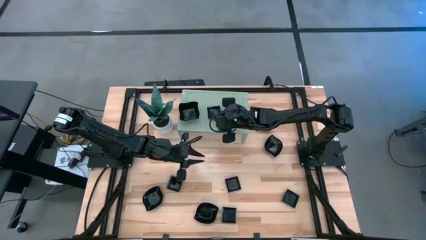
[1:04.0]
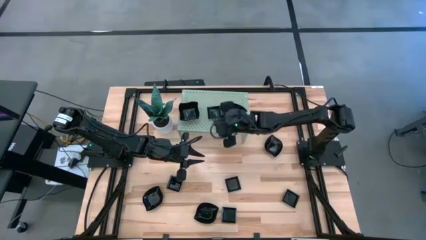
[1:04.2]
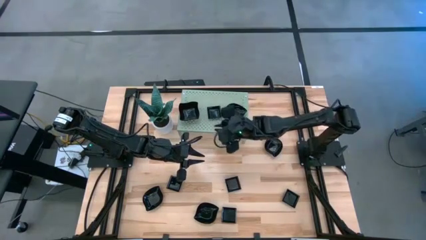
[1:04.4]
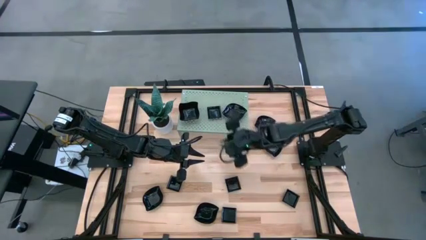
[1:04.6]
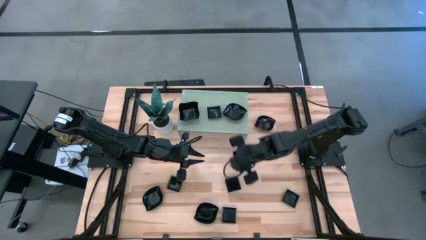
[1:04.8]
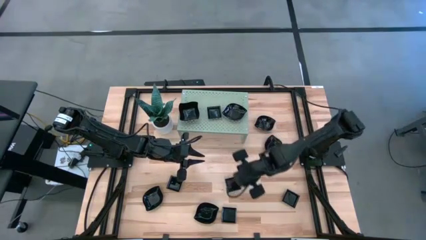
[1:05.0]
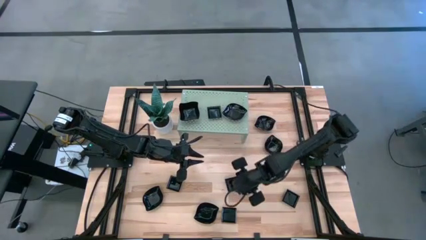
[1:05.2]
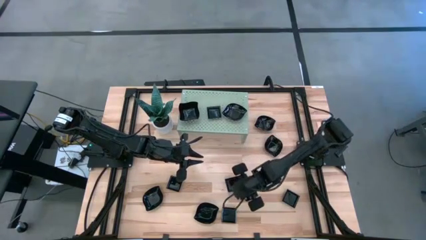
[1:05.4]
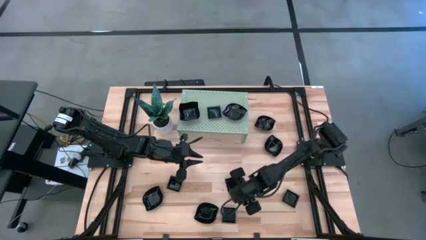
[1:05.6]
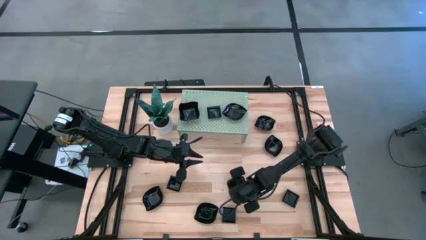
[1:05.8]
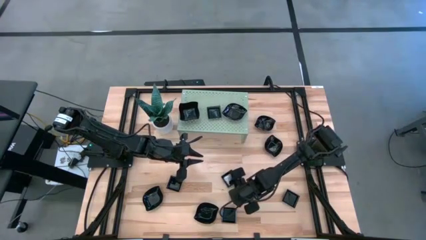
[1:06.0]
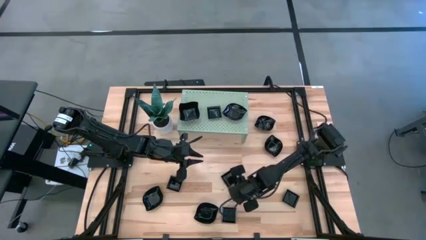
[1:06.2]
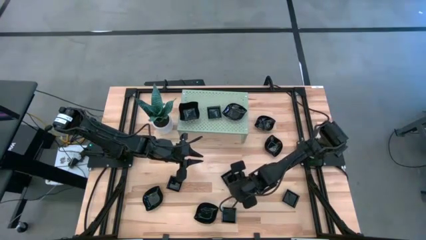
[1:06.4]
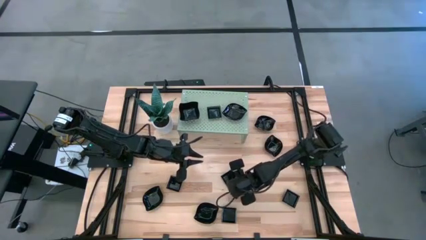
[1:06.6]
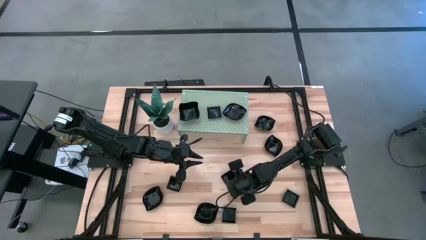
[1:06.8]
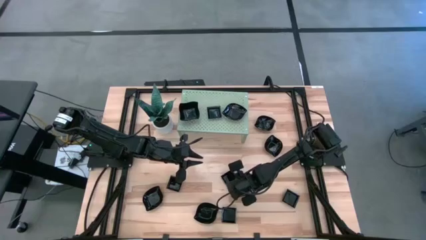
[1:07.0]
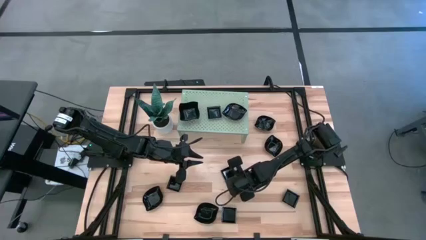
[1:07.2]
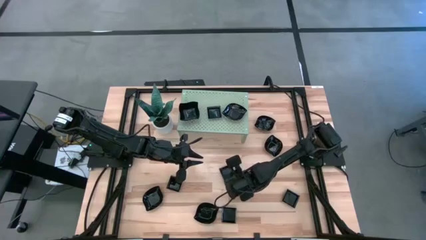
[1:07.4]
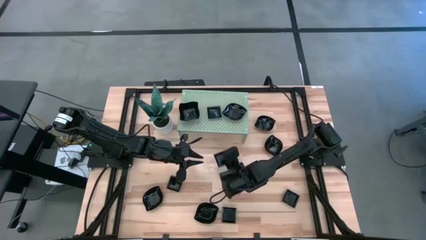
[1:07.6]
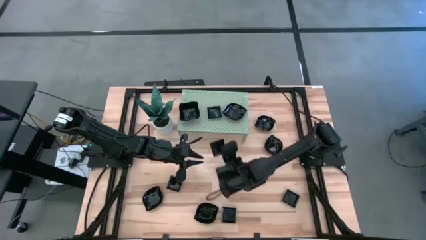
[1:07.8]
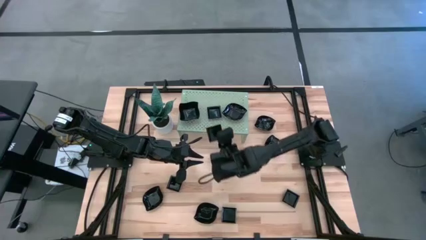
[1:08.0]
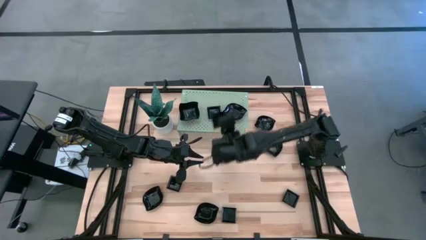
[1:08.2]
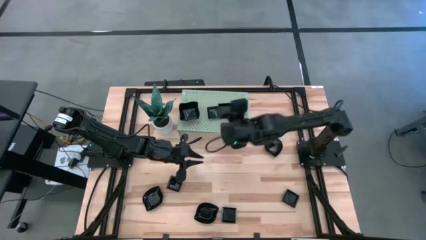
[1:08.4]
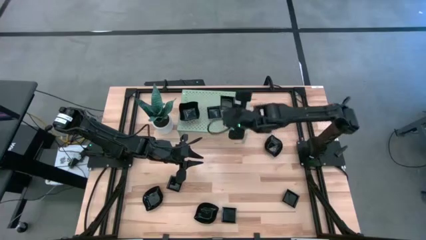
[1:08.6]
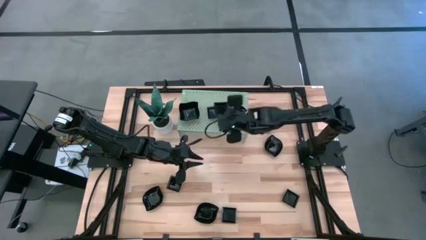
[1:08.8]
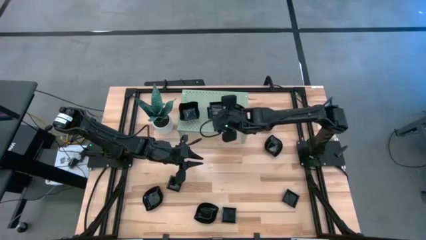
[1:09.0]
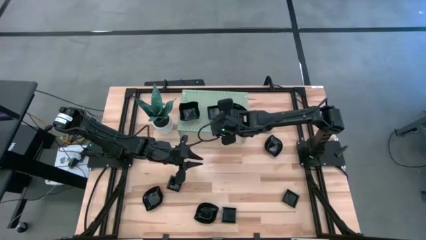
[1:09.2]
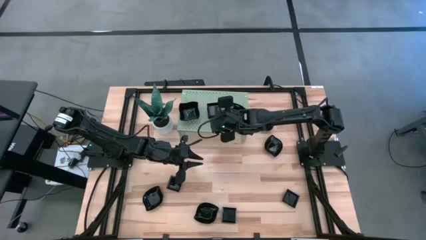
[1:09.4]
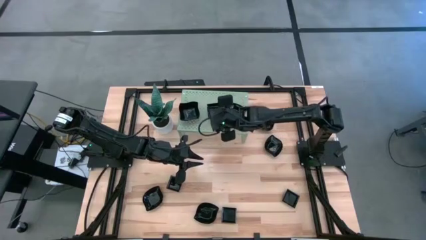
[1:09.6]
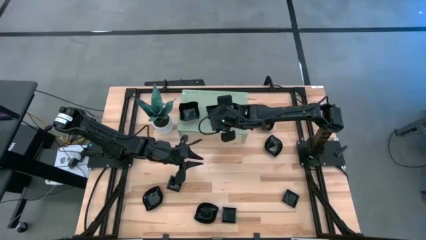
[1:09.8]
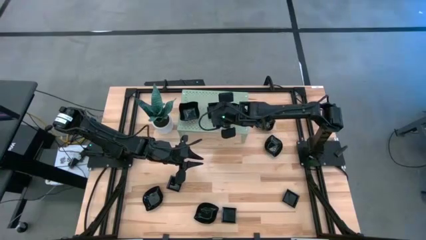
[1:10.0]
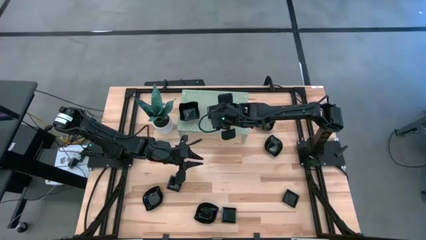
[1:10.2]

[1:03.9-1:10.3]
Task: Pick & Place Mini shaped plates
Stack the square plate on top of the other square plate on the shelf

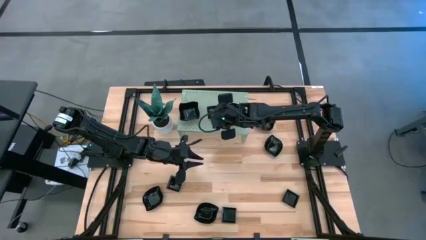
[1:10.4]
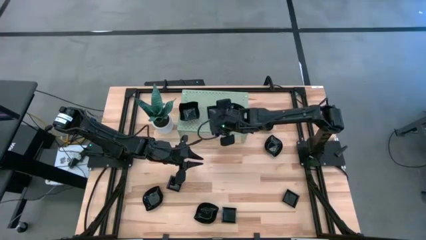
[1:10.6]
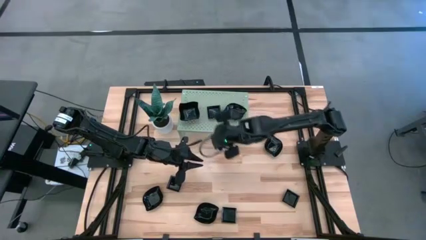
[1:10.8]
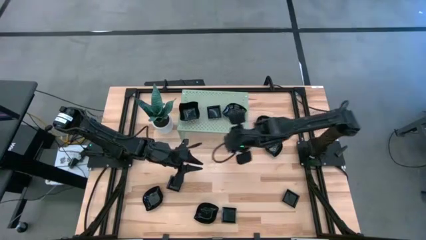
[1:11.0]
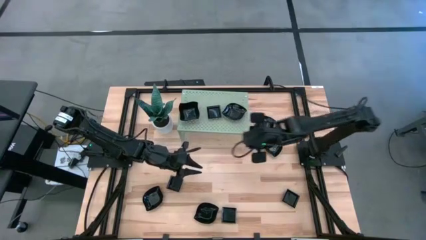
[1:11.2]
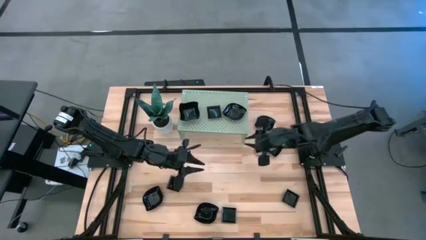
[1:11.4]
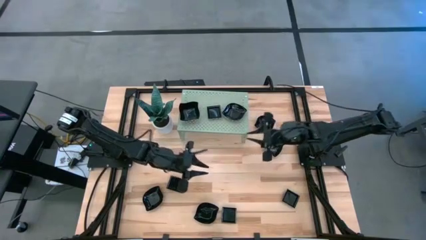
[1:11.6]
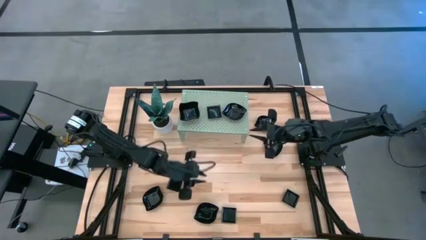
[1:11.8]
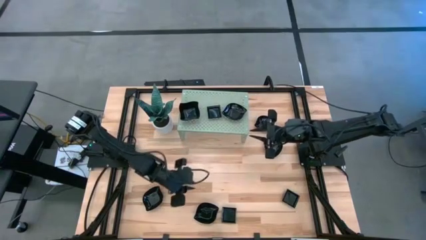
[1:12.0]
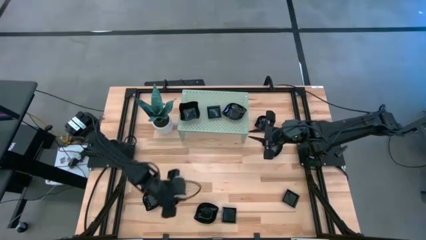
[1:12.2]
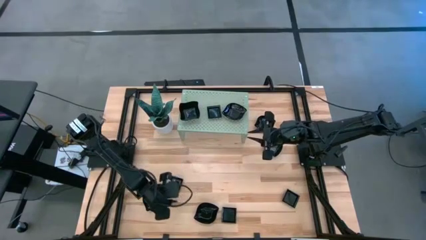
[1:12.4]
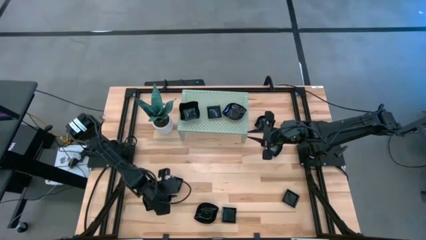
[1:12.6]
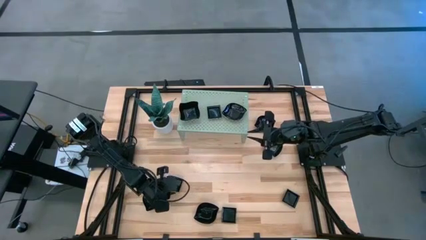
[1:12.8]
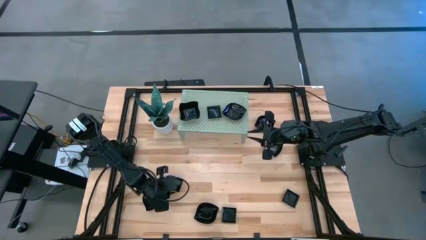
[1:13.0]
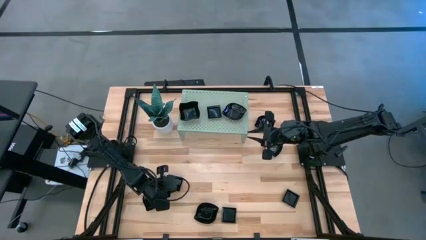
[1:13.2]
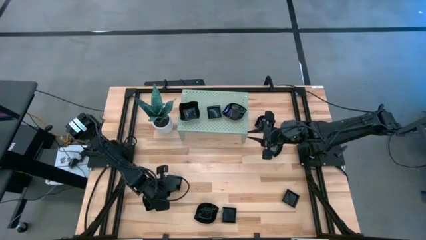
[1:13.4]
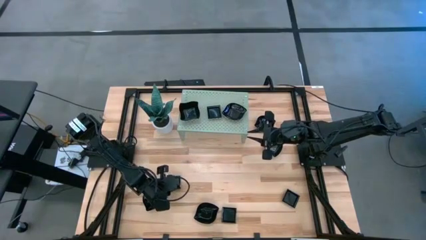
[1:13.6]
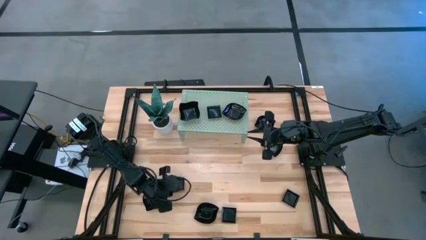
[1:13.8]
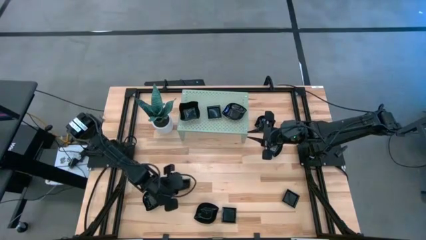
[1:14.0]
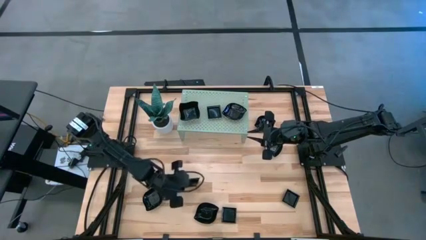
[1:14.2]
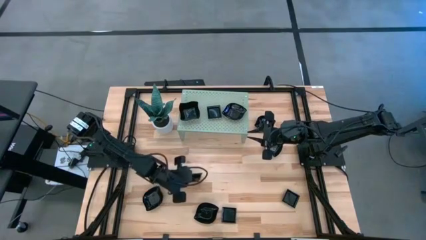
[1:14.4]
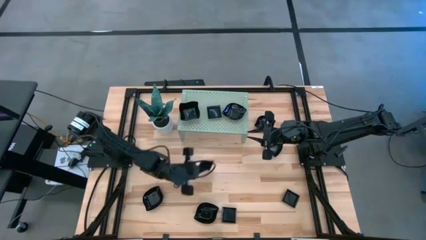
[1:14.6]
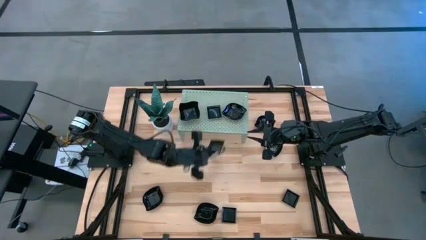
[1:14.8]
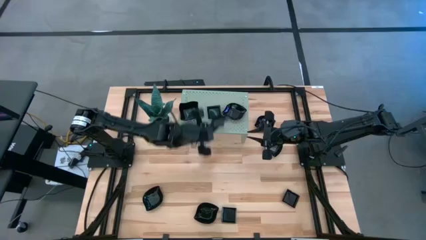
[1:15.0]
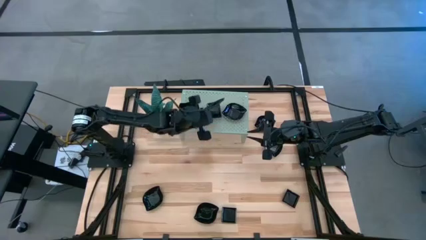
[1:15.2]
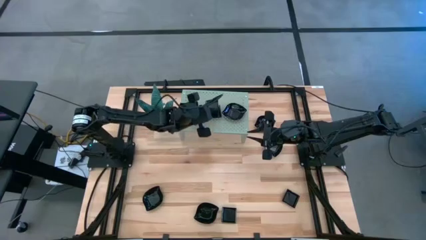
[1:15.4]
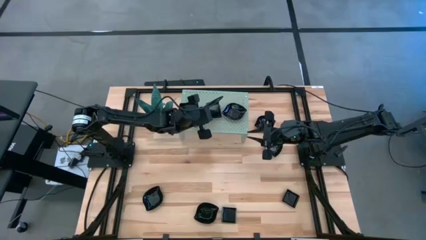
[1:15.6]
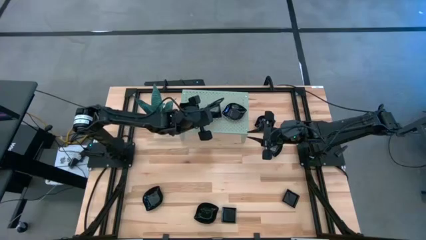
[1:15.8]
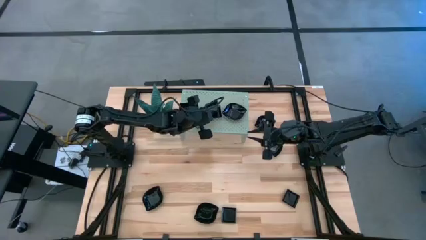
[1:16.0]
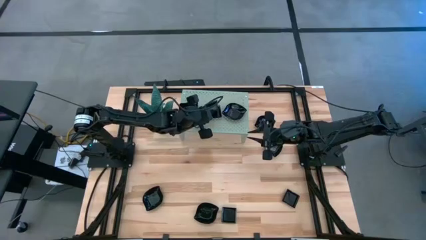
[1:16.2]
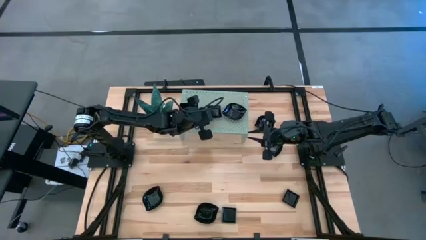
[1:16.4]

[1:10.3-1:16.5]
Stack the square plate on top of the other square plate on the shelf

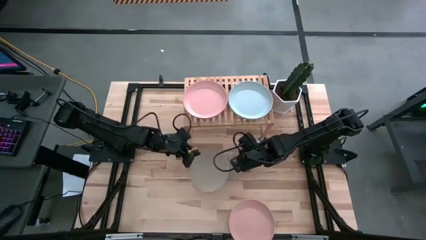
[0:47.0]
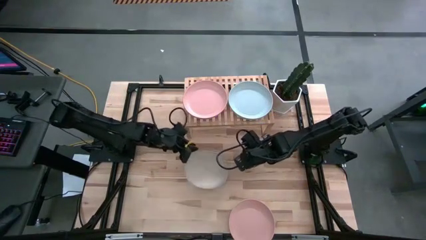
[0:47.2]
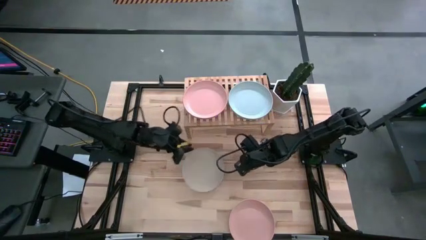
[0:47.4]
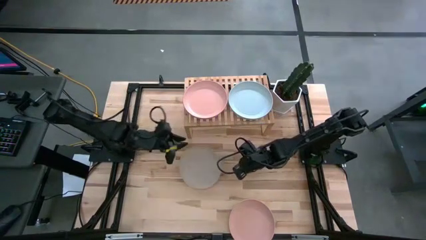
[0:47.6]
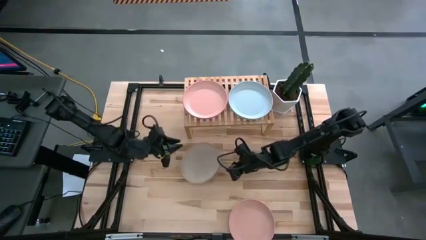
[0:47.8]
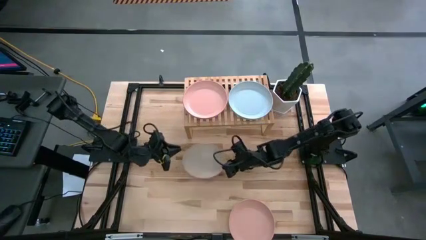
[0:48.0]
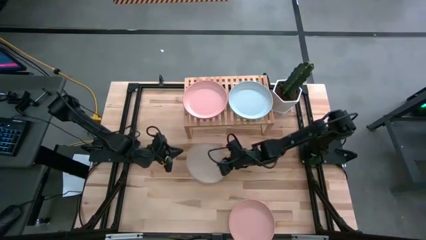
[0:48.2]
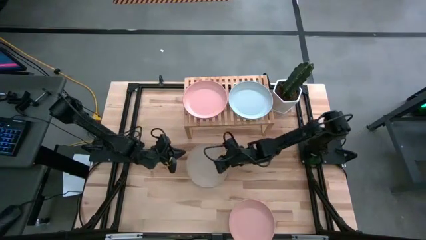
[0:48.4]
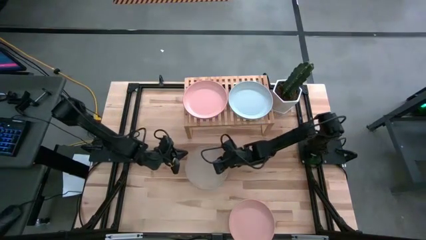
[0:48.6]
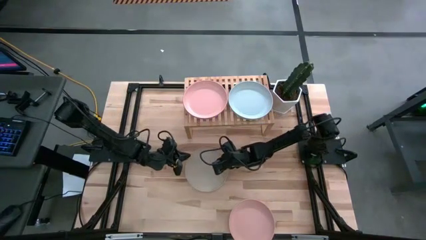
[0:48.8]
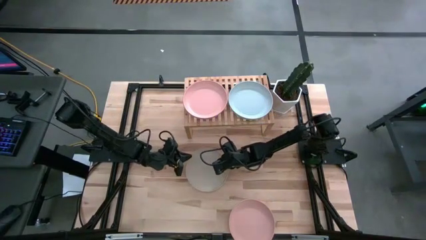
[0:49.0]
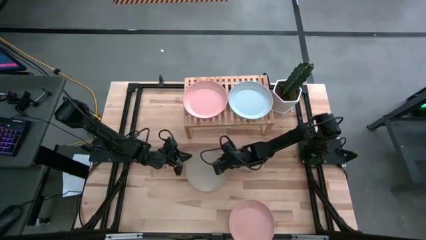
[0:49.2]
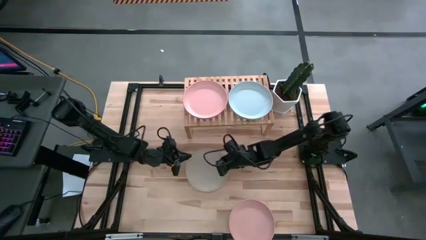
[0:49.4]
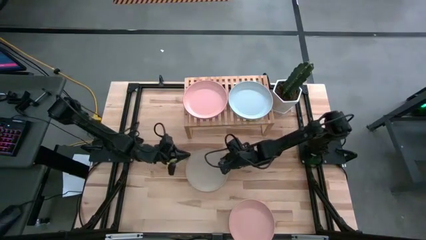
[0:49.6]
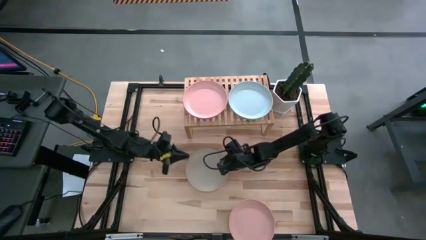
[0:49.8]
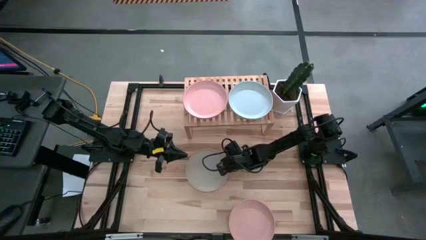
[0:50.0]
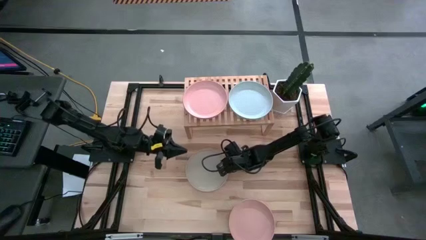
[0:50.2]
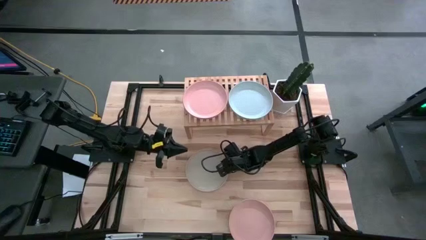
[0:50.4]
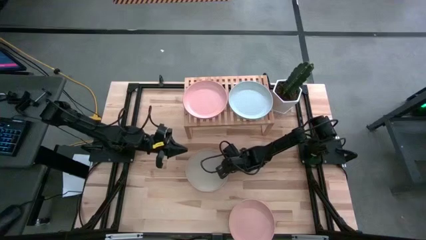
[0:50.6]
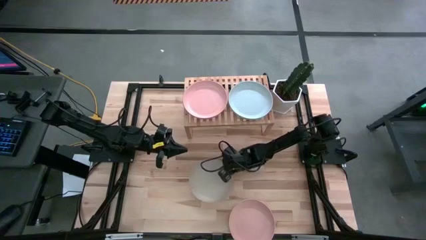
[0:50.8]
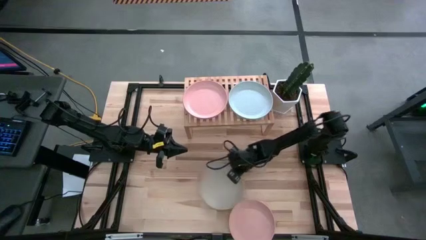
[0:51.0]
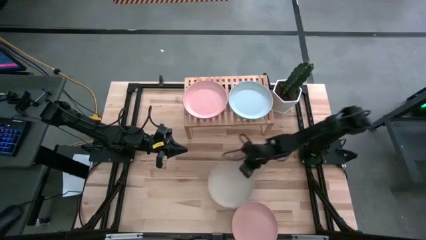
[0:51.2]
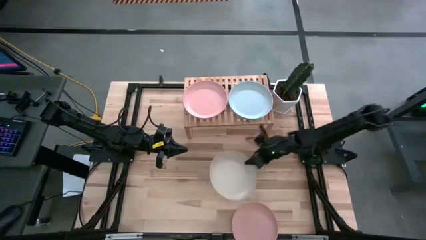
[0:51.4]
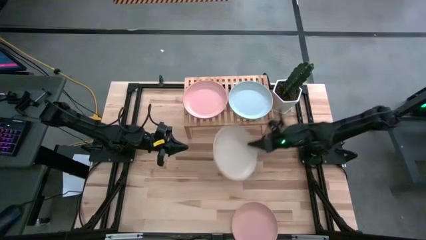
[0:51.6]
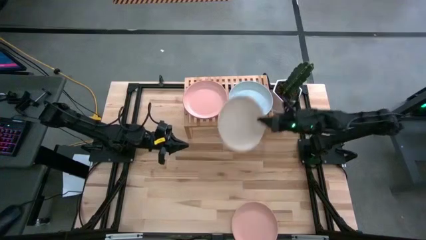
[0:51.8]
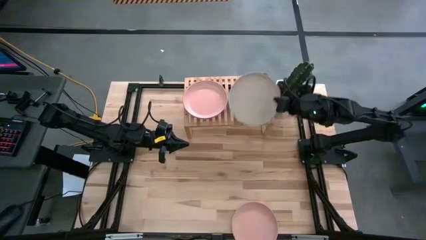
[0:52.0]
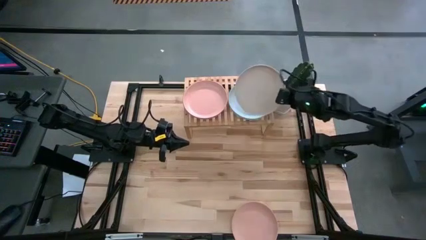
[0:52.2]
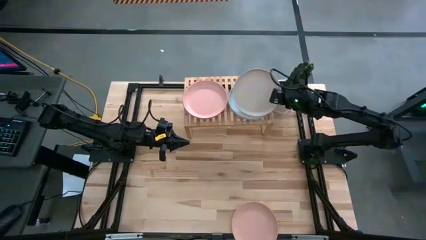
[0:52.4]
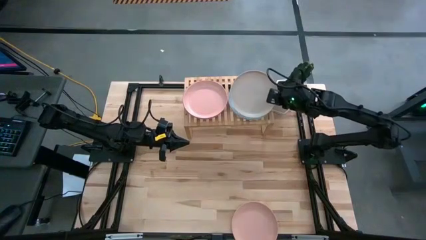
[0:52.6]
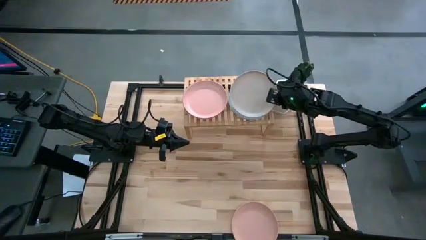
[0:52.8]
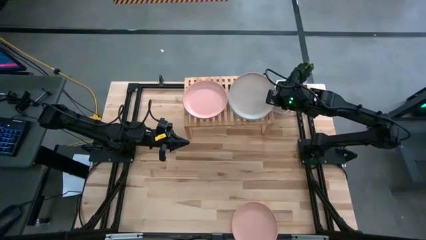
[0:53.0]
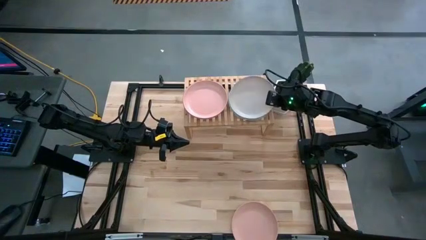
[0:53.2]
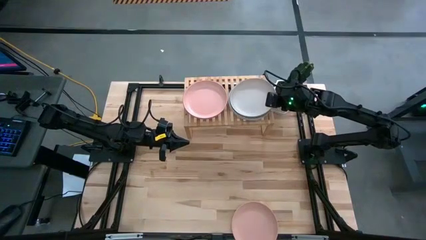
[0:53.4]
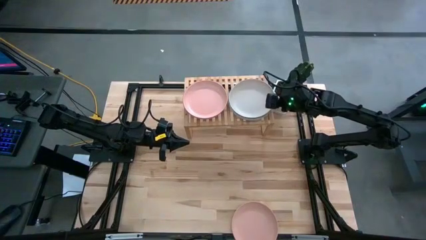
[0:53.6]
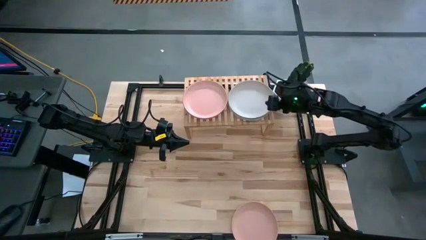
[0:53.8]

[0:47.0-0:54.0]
Task: Place and stack plates onto a shelf
Stack the gray plate on top of the blue plate on the shelf
